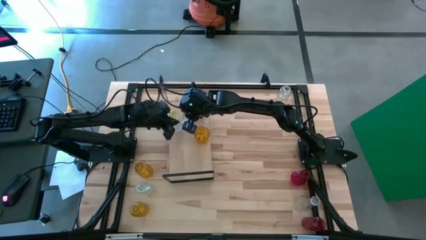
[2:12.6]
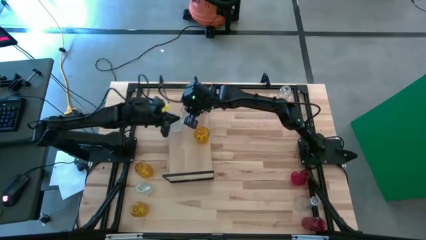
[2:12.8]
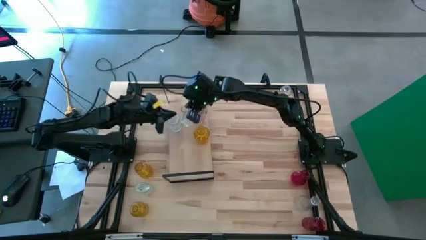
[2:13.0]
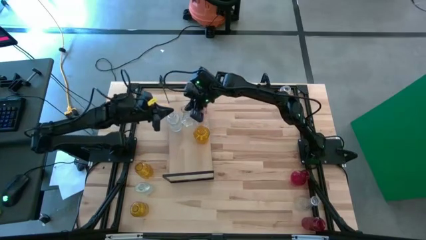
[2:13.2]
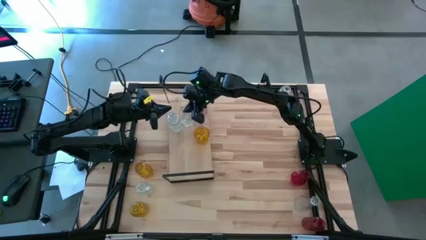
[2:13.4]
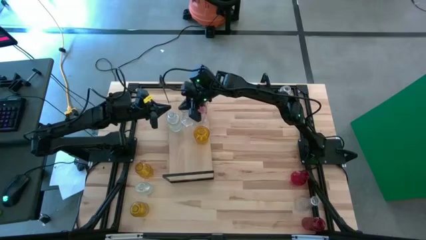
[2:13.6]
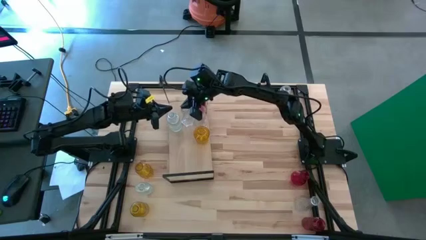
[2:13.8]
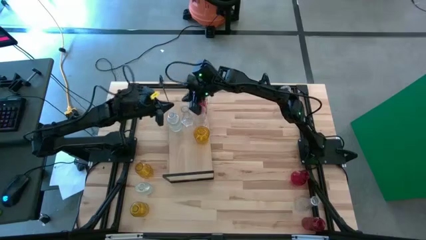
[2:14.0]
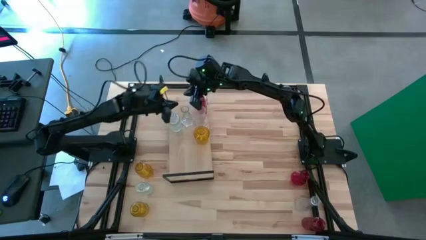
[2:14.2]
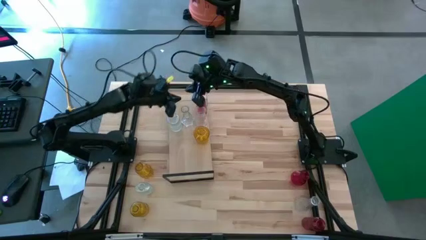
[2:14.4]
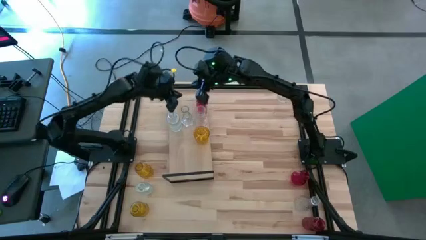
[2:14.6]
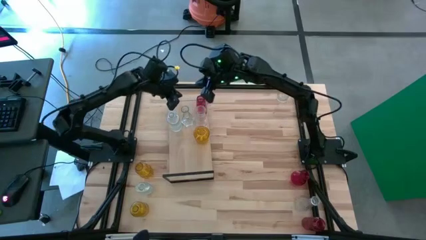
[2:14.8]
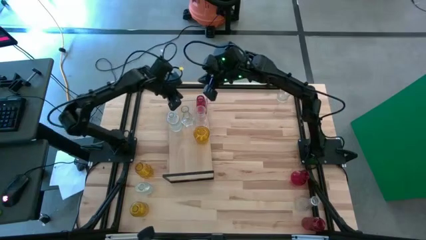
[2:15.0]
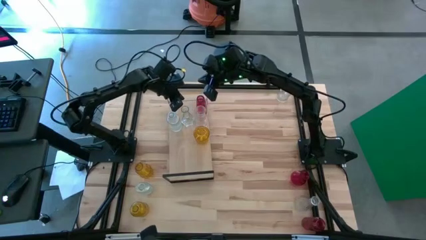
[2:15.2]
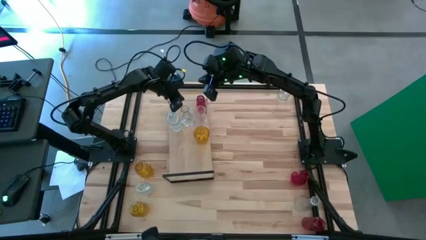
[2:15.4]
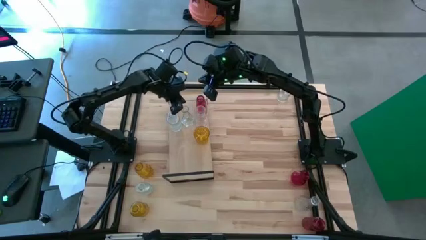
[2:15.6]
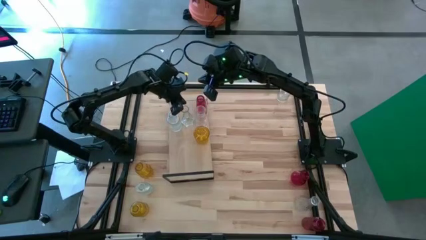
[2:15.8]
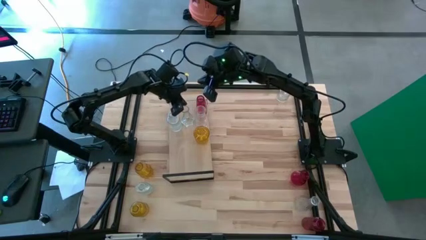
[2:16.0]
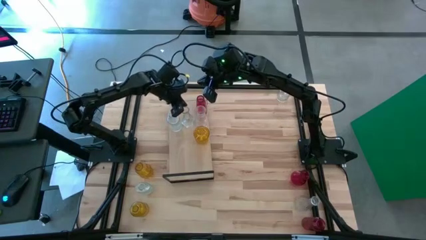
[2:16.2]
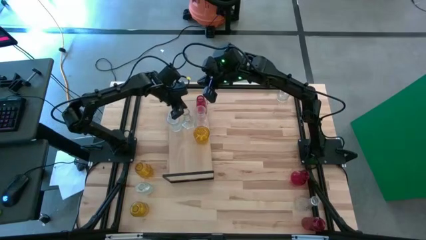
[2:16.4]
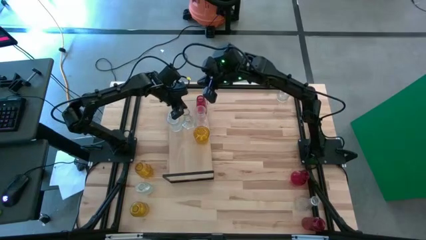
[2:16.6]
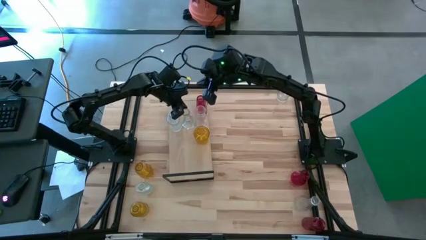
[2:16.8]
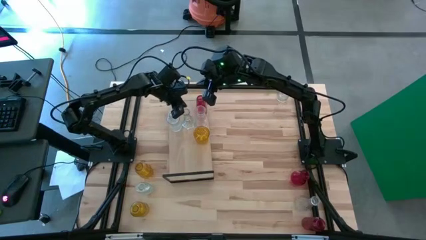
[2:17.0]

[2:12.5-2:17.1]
Task: sort vases onto shelf
Adjust the transparent vase on the shelf

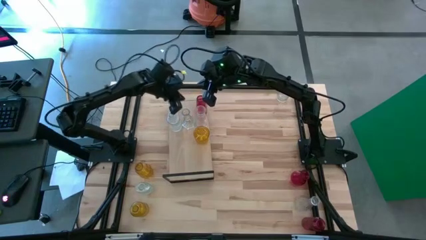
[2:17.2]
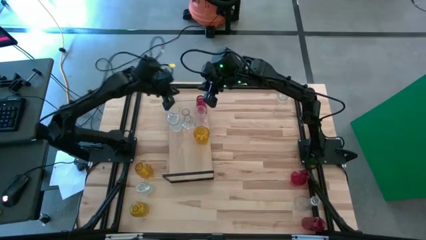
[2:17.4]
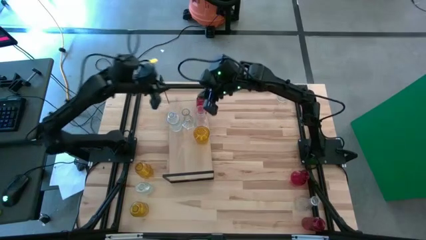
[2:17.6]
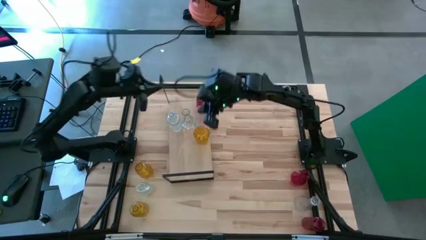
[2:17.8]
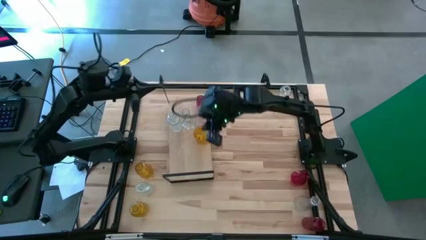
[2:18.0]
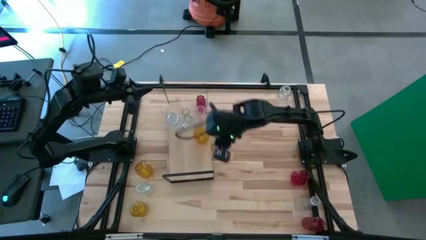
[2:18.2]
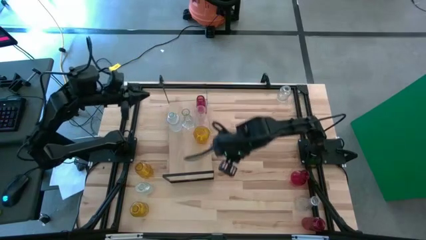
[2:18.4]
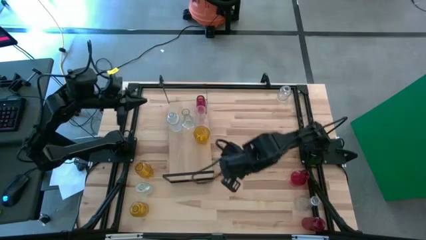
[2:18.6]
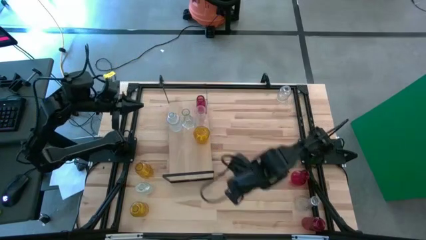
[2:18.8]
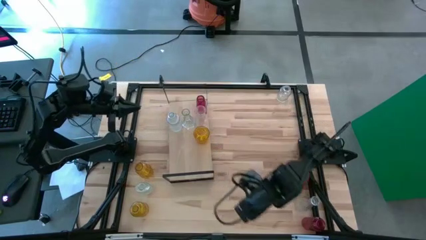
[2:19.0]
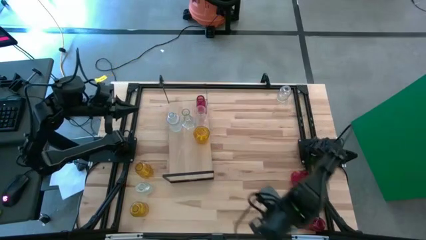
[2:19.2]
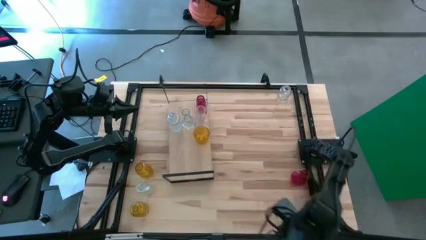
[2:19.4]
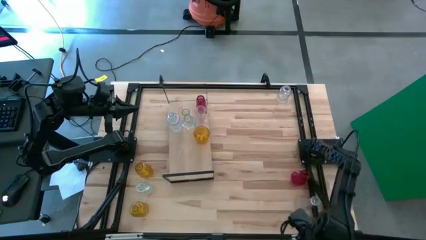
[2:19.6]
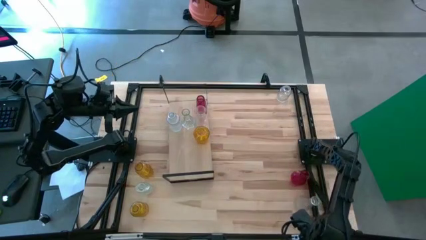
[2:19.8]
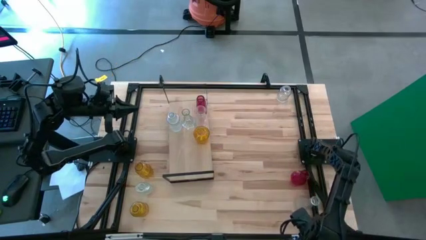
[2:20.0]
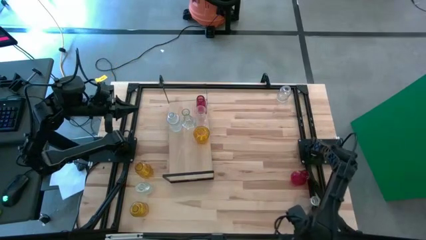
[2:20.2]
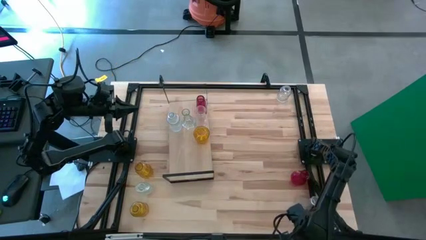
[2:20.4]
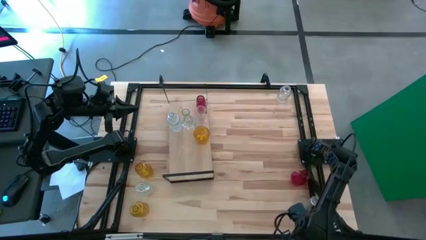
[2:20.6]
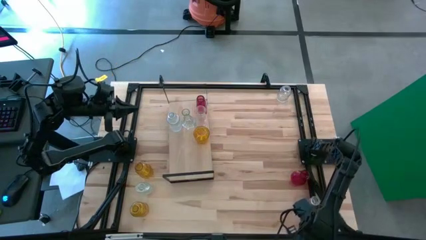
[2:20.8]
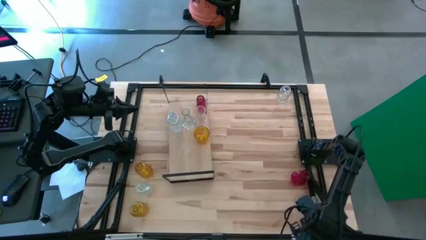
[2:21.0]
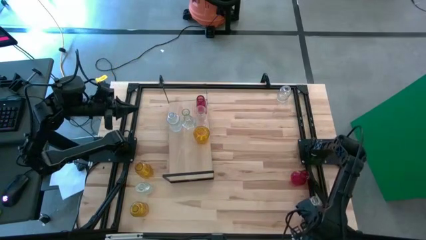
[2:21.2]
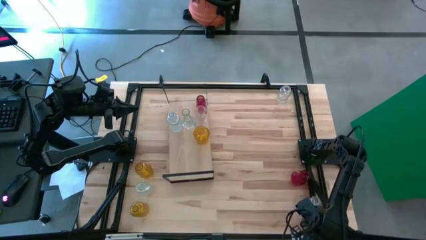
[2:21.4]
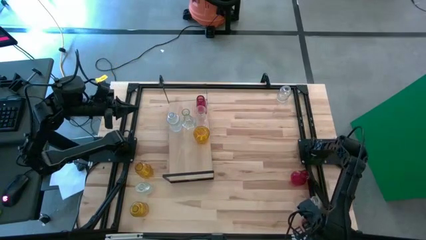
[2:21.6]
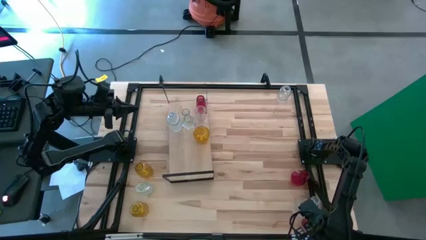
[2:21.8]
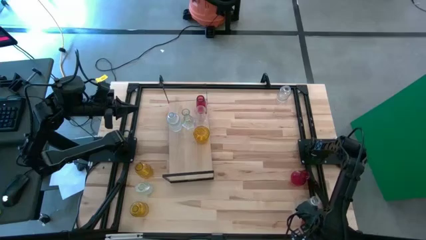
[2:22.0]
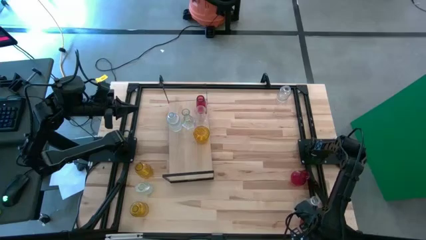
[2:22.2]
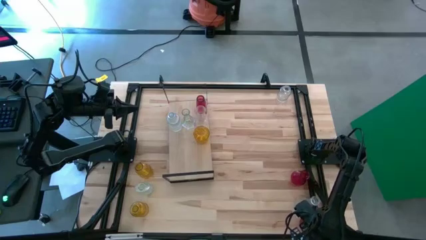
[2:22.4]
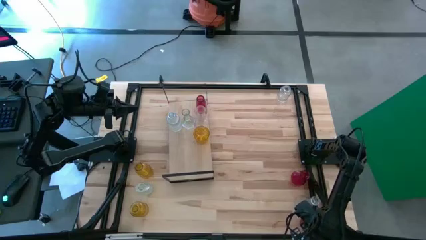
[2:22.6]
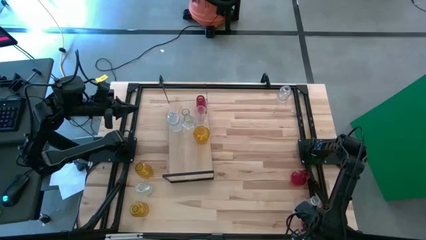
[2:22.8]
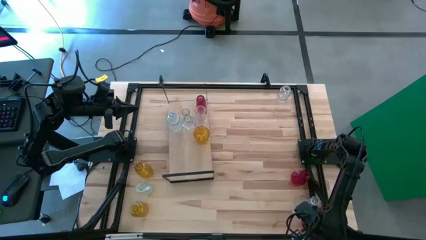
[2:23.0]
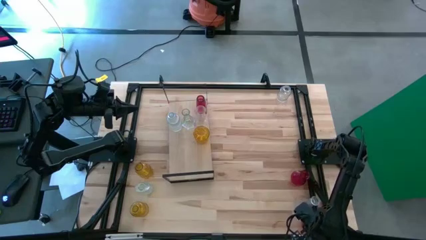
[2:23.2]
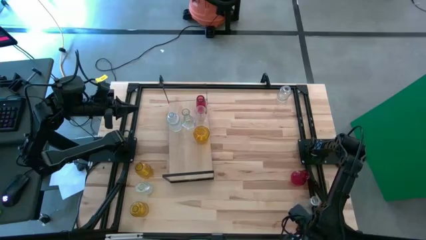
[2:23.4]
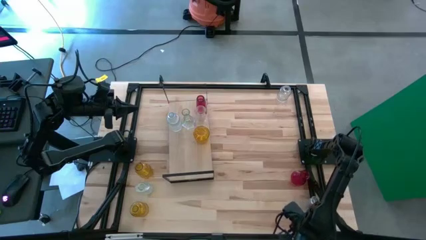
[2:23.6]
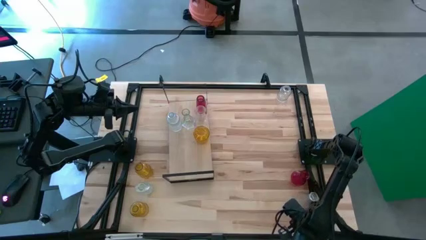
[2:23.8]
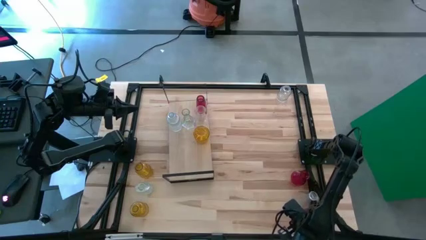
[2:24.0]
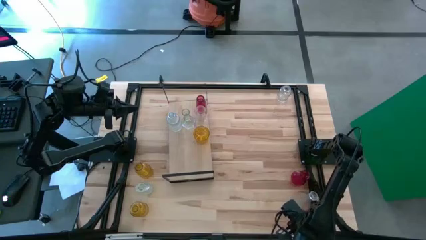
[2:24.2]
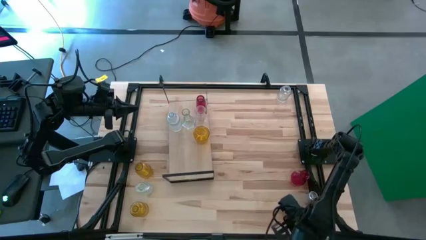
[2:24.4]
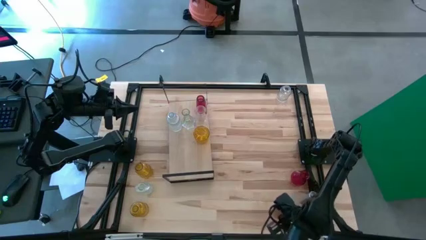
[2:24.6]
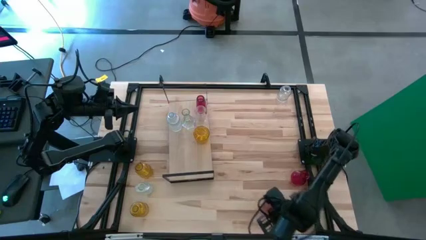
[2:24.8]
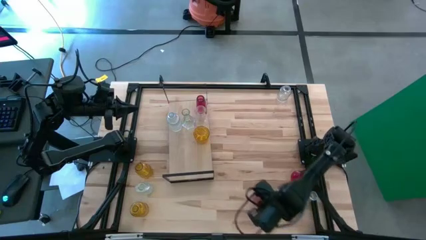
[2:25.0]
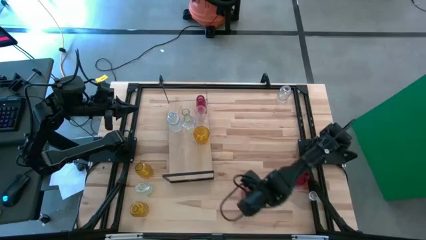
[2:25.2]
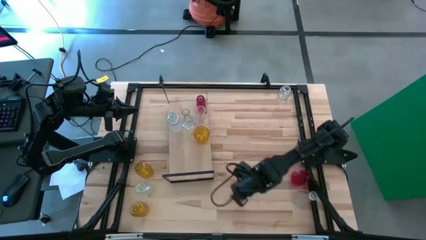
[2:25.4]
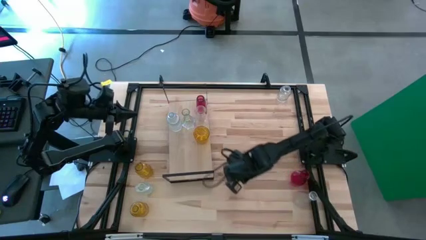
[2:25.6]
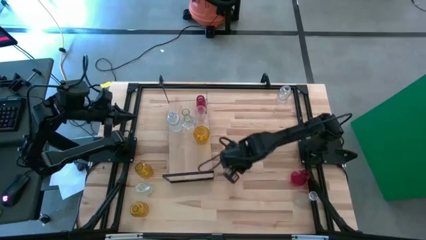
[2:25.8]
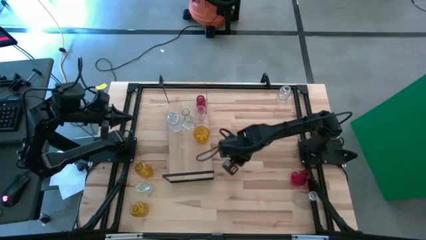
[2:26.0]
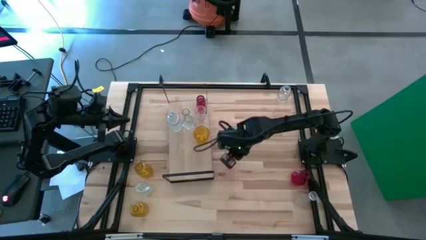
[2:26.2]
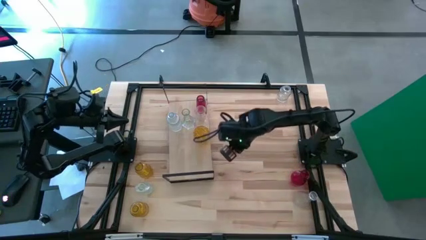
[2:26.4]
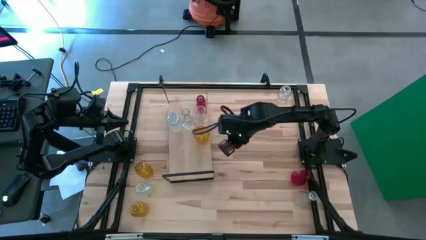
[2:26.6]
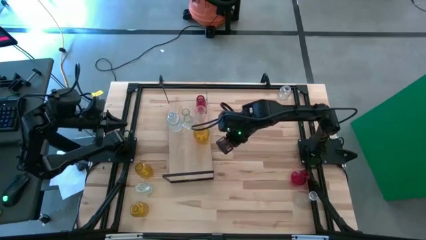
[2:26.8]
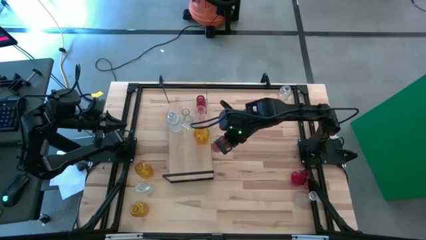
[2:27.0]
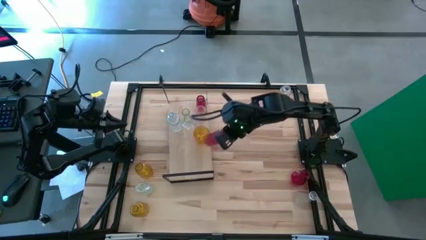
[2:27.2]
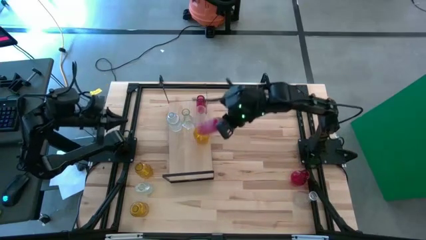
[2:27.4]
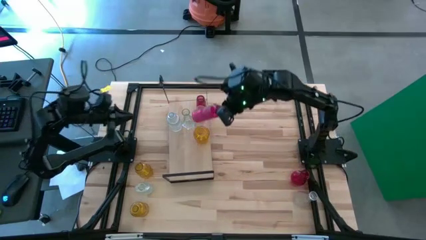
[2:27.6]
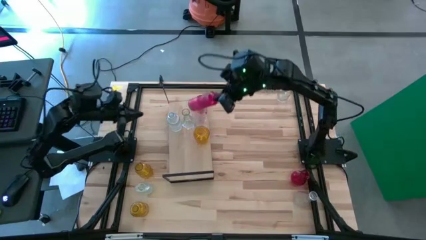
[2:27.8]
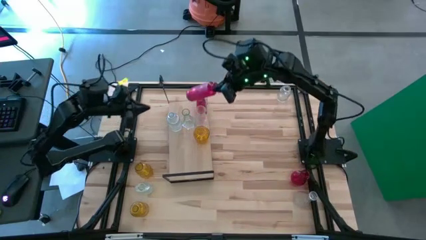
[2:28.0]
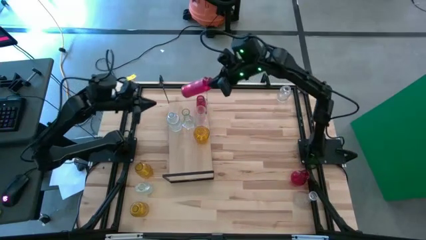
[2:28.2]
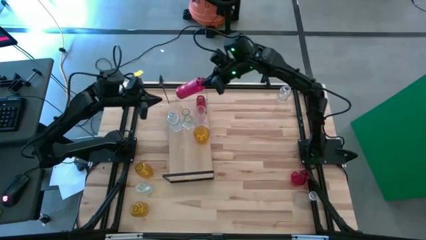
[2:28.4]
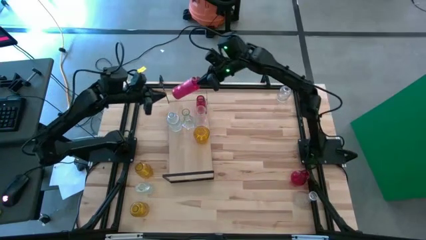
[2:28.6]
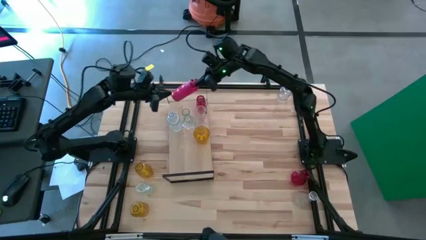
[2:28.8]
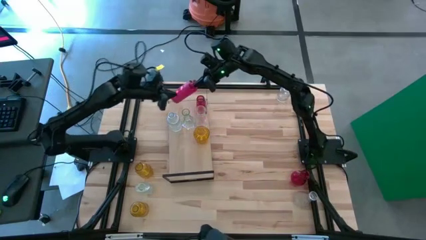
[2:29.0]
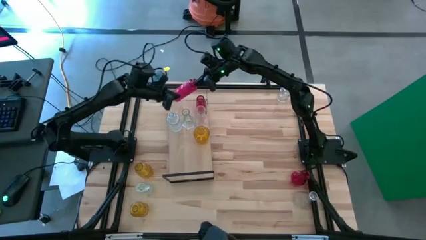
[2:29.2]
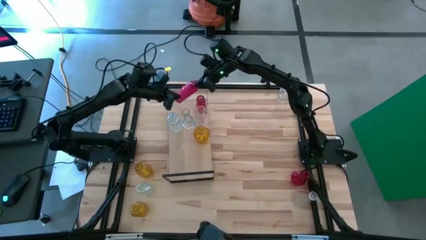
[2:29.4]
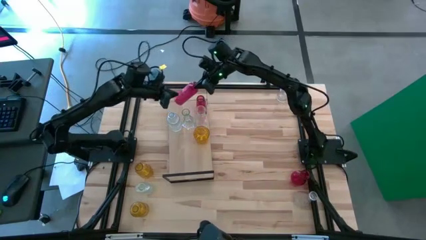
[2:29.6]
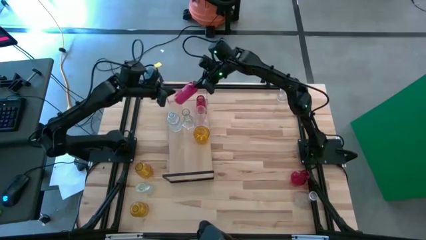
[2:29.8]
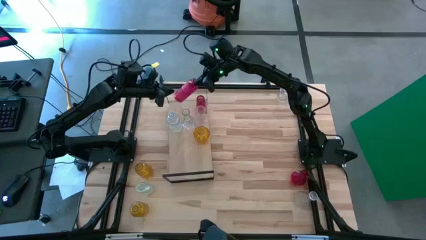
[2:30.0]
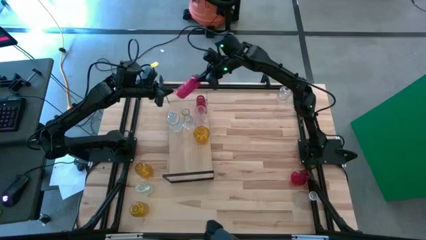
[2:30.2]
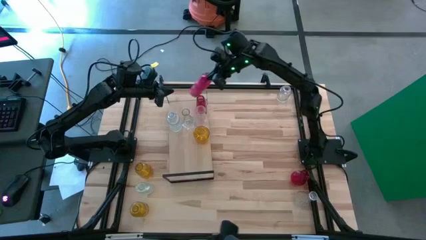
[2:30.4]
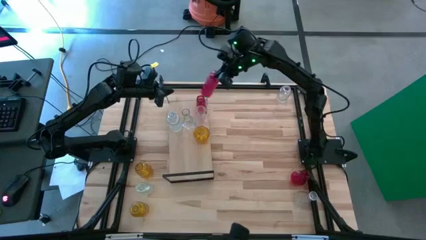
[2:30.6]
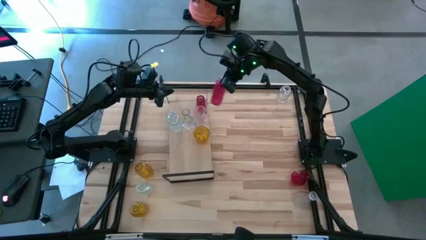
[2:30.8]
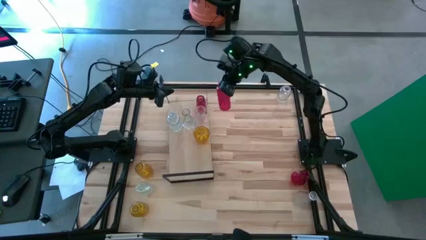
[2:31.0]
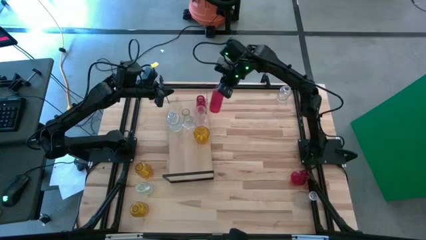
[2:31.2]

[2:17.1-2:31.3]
Put the bottom red vase on the shelf
